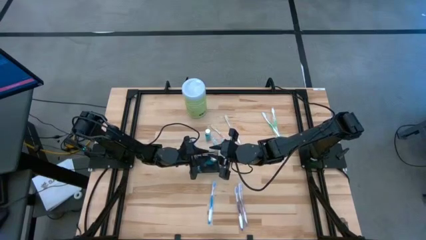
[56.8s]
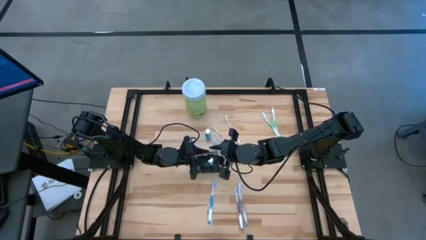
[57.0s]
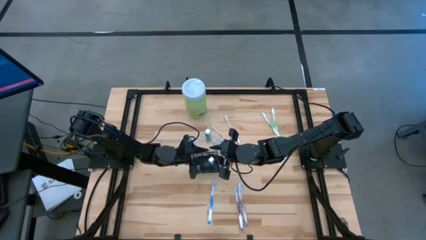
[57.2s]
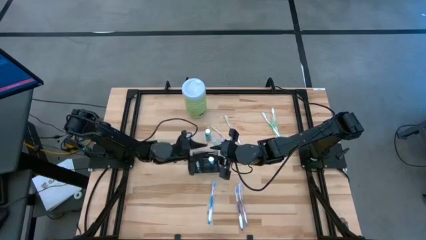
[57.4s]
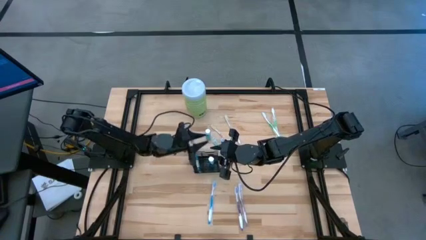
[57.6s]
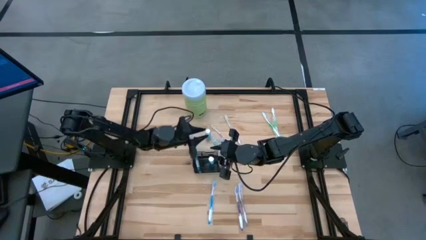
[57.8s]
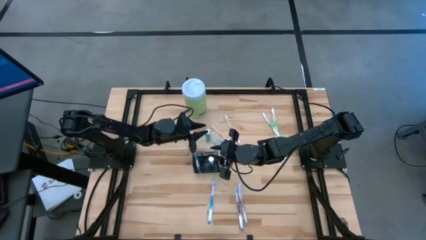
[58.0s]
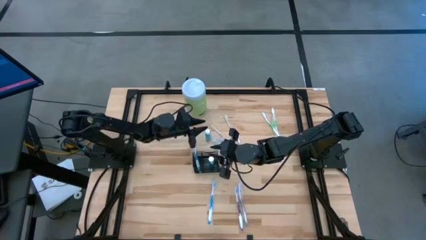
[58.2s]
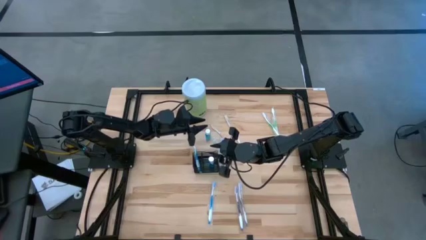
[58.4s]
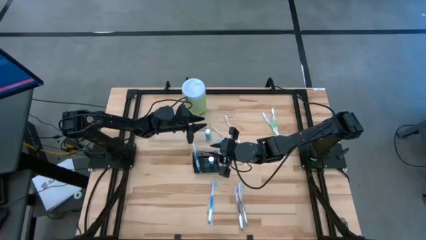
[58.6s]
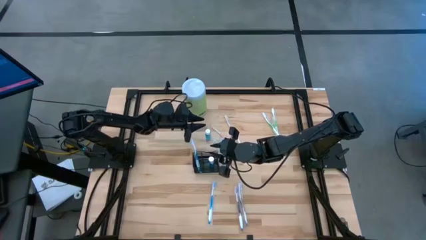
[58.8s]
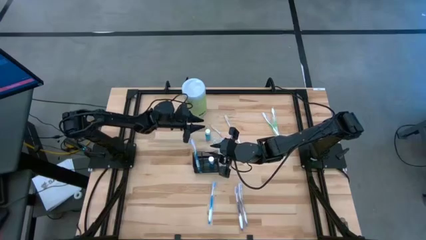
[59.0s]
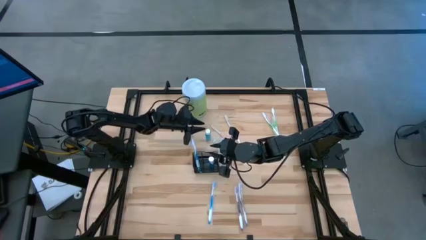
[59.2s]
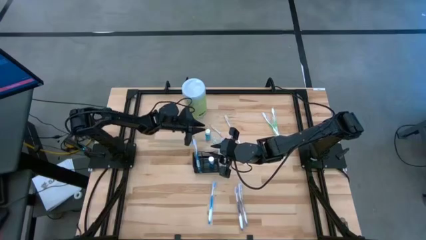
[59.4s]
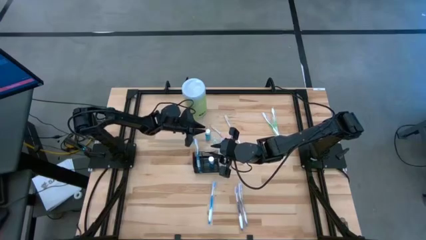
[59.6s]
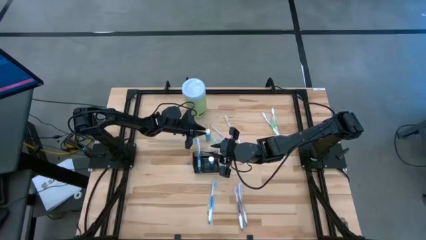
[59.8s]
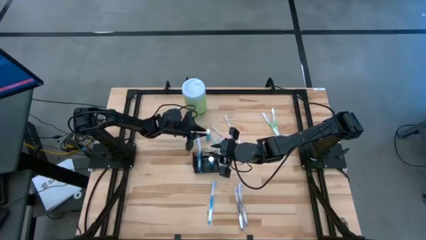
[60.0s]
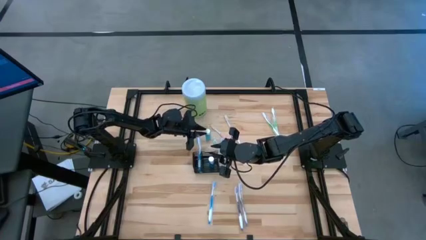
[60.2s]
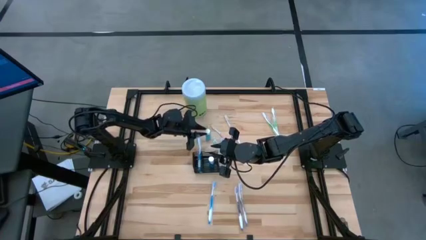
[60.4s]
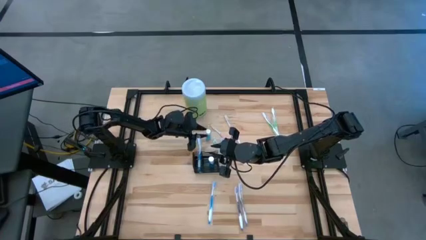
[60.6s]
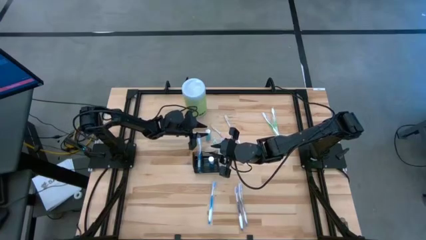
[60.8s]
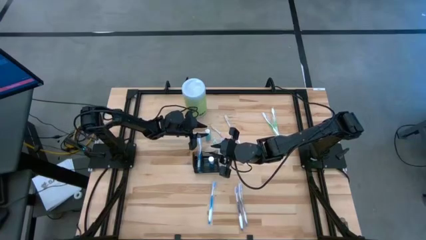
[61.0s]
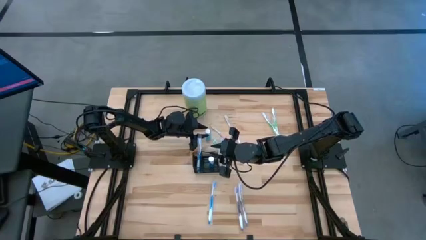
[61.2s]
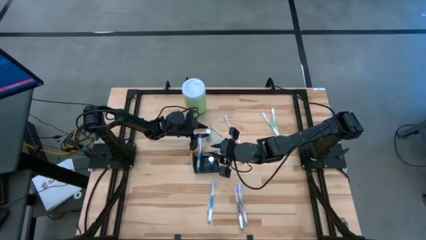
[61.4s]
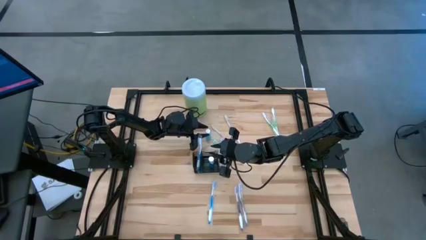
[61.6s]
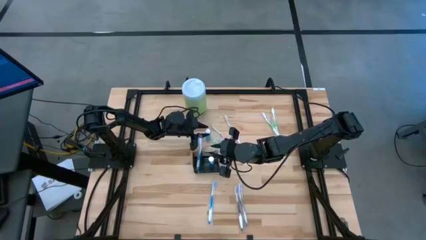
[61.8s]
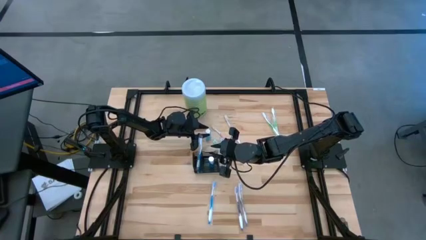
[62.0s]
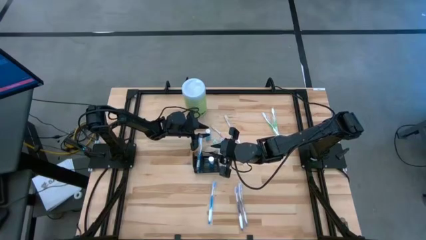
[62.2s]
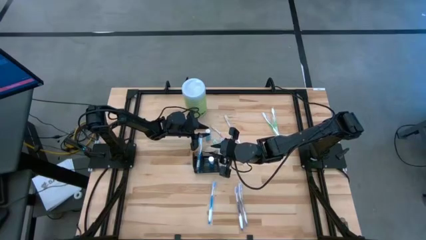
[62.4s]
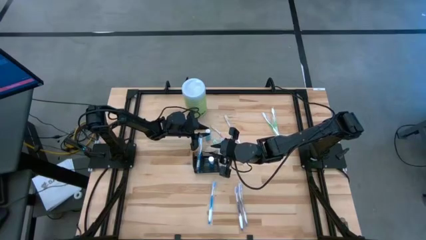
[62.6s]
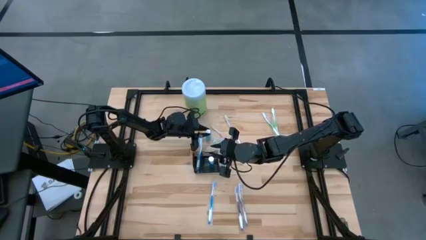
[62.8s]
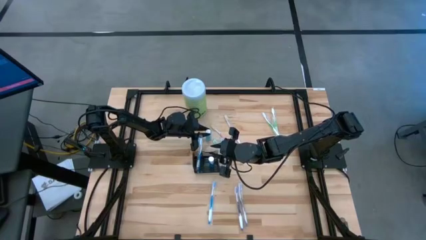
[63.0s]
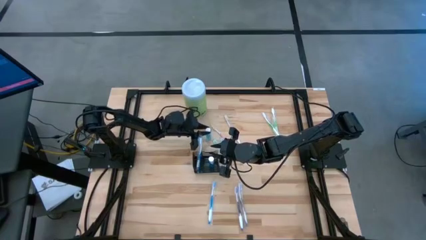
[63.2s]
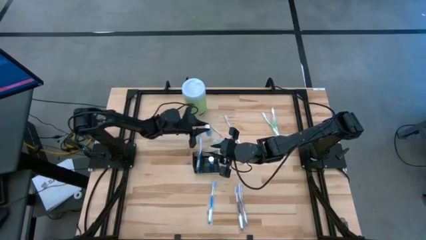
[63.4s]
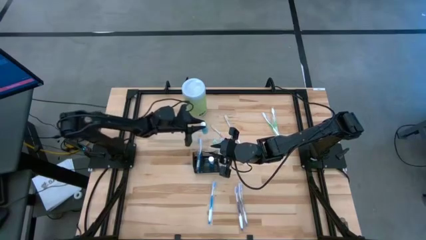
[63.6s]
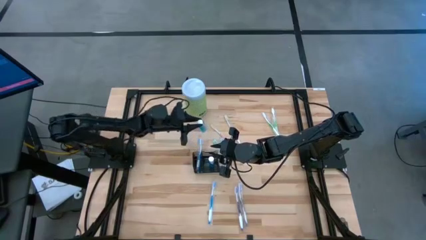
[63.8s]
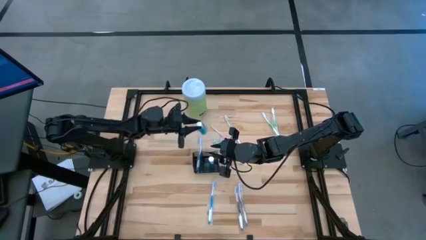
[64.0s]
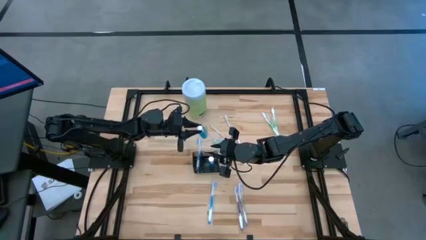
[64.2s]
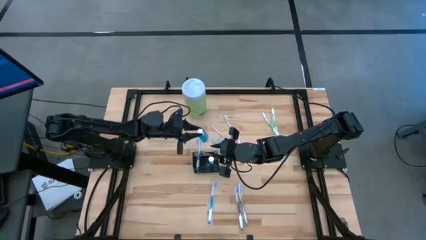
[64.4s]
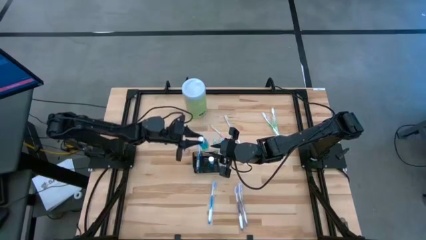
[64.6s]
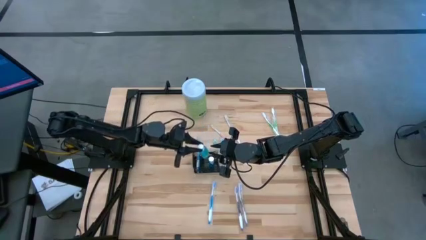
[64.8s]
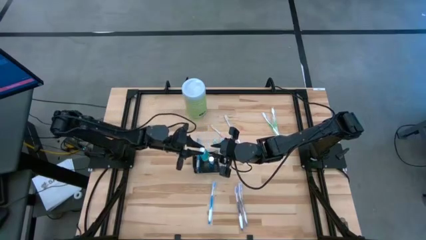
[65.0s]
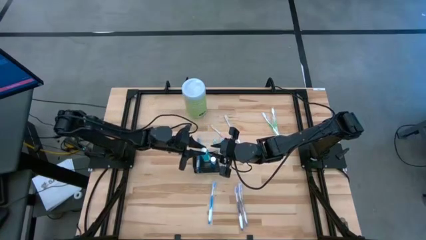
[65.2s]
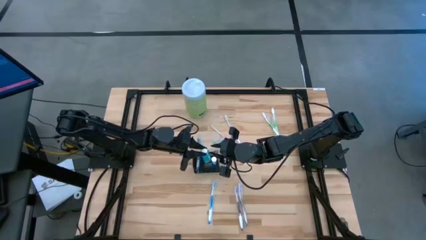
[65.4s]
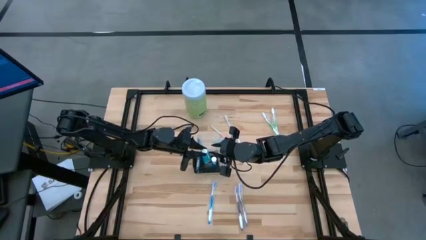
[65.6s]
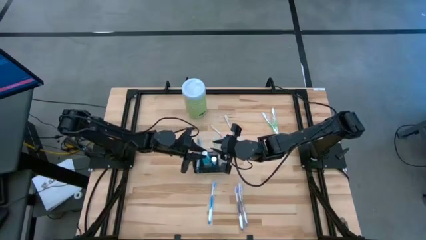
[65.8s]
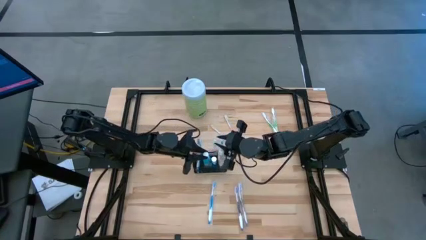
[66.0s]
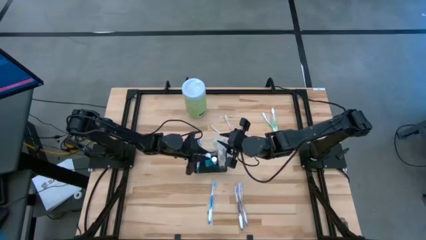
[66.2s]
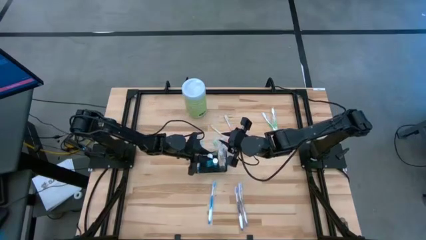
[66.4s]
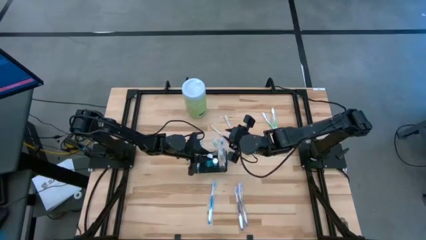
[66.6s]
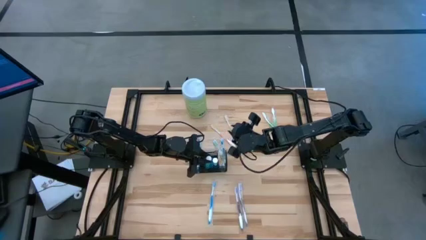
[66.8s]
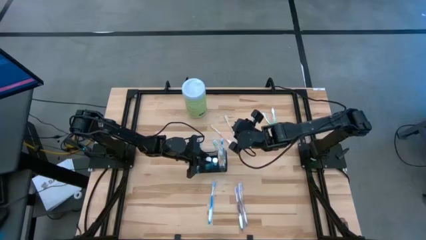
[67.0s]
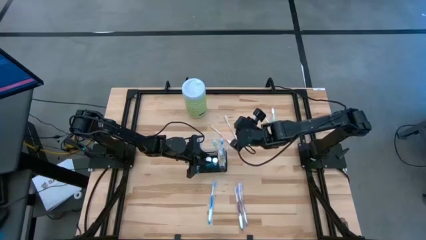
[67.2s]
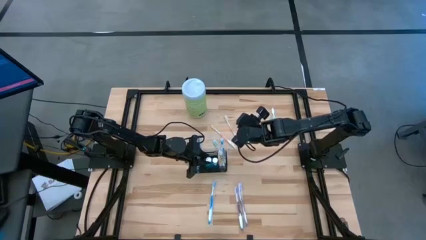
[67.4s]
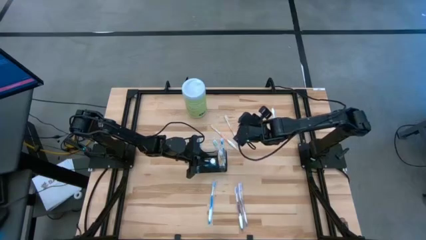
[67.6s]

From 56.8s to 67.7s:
Task: Pick & Place toothbrushing station
Put the mouthwash into the wire organizer
